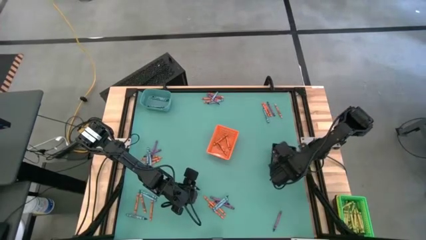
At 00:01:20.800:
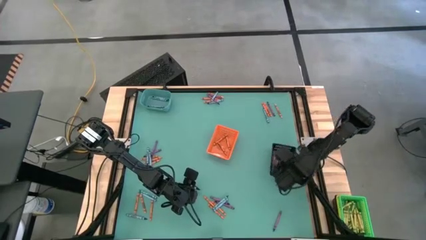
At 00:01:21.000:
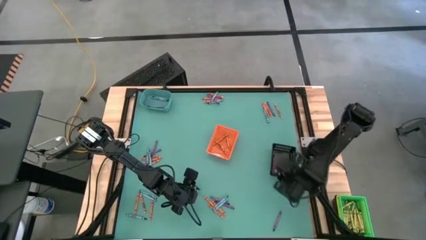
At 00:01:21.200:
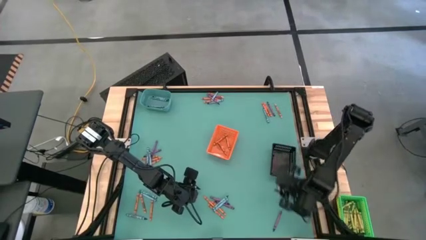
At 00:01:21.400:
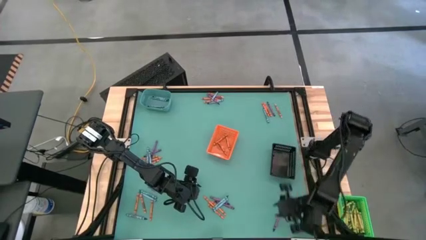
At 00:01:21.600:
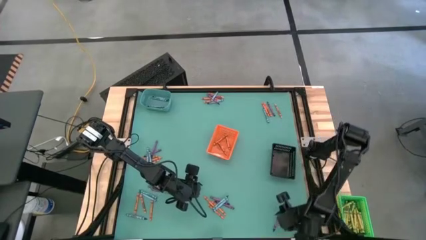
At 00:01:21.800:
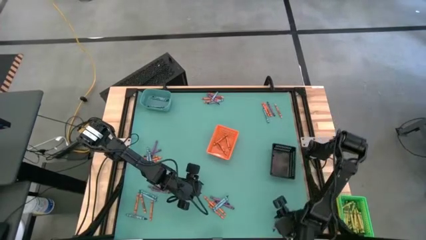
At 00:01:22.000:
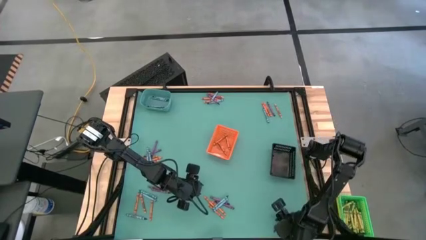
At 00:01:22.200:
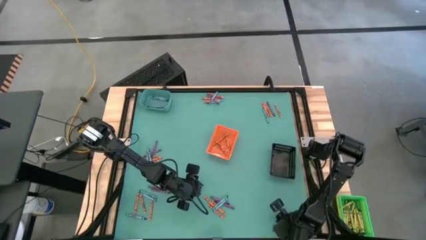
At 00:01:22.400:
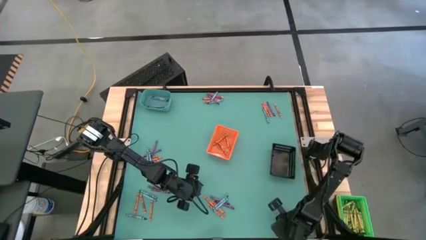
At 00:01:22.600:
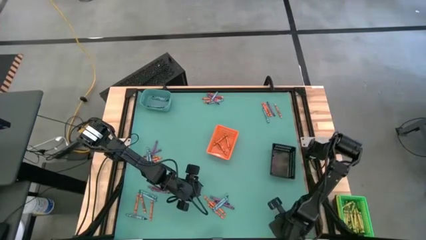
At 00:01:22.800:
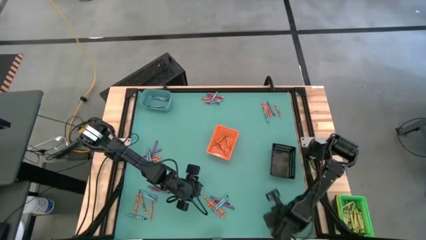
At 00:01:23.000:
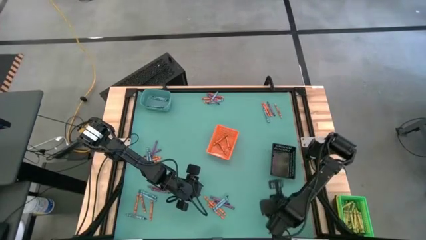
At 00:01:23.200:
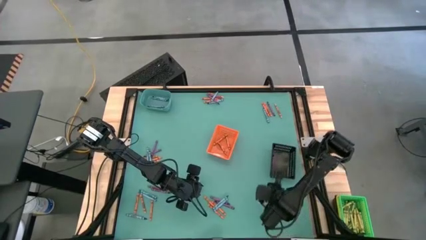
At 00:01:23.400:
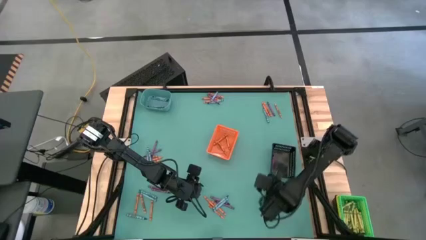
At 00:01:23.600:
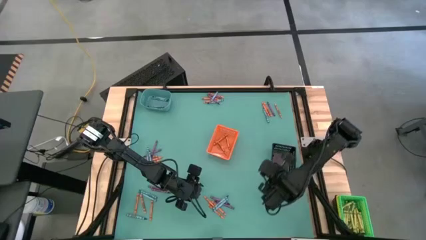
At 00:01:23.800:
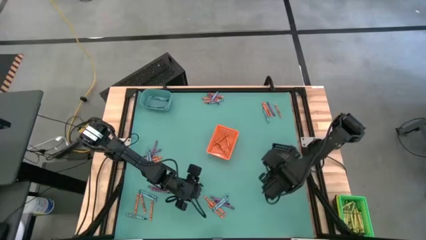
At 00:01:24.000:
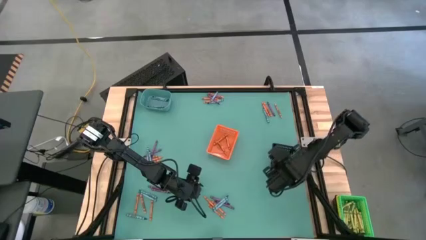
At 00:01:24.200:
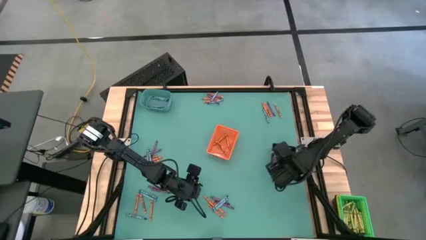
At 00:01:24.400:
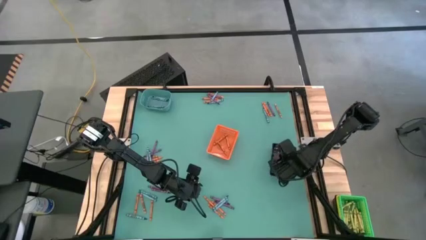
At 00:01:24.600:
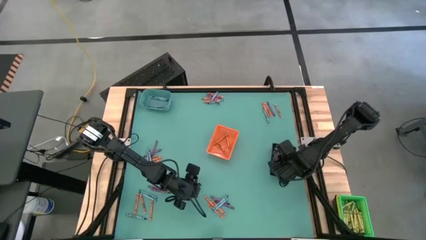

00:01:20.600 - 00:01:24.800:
Task: Sort crayons
Put the violet crayon into black bin

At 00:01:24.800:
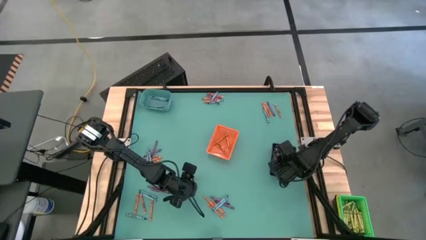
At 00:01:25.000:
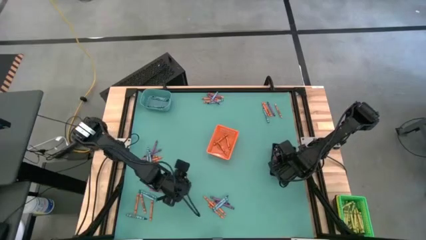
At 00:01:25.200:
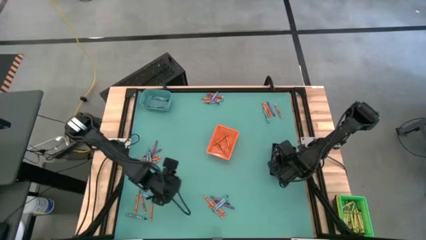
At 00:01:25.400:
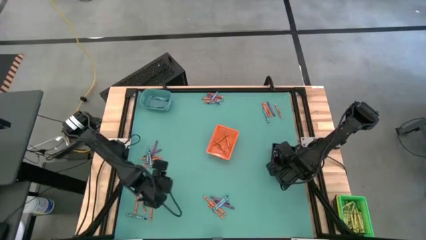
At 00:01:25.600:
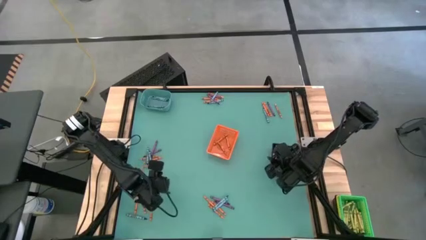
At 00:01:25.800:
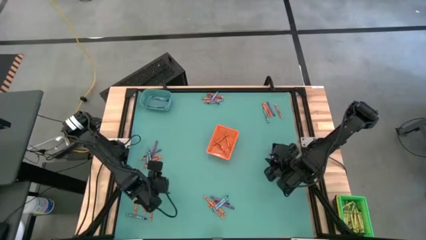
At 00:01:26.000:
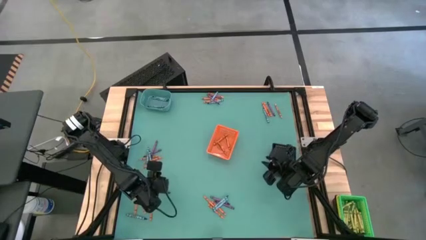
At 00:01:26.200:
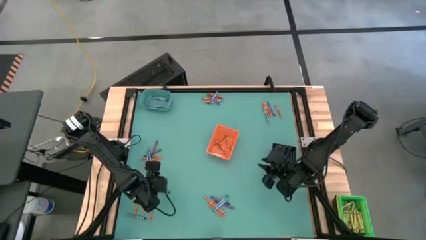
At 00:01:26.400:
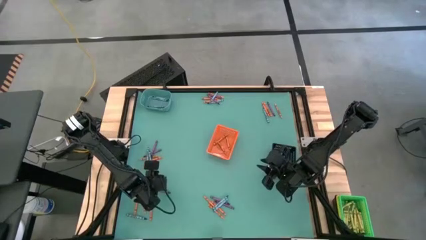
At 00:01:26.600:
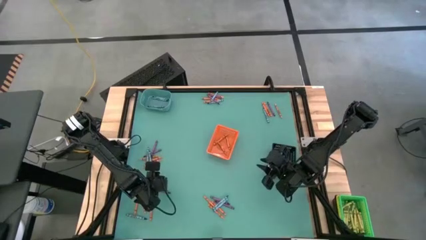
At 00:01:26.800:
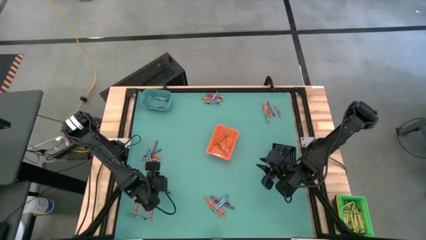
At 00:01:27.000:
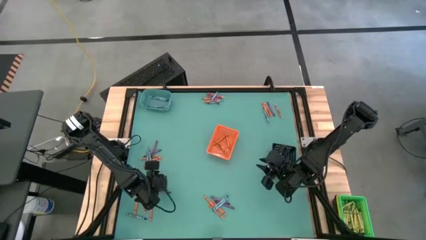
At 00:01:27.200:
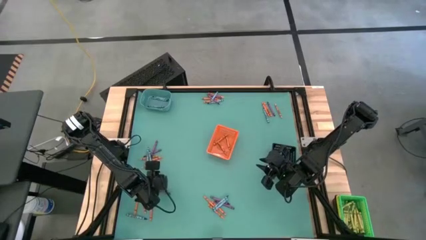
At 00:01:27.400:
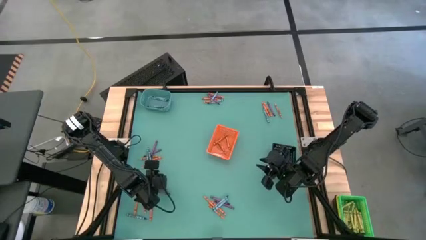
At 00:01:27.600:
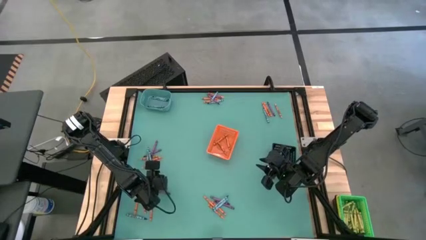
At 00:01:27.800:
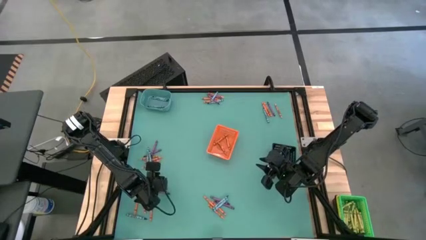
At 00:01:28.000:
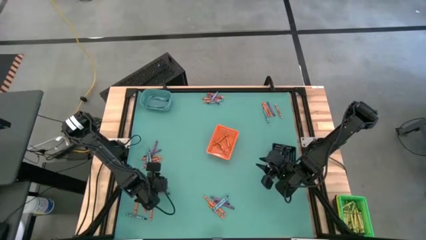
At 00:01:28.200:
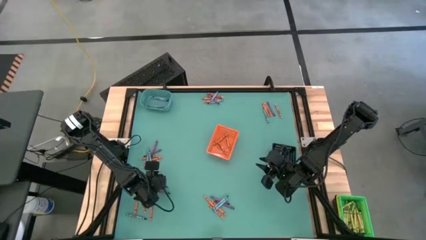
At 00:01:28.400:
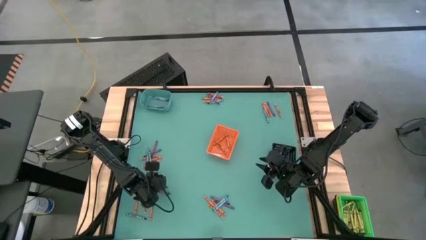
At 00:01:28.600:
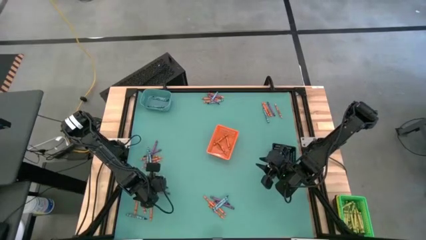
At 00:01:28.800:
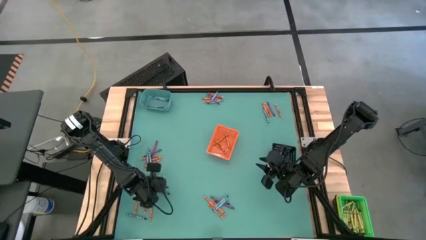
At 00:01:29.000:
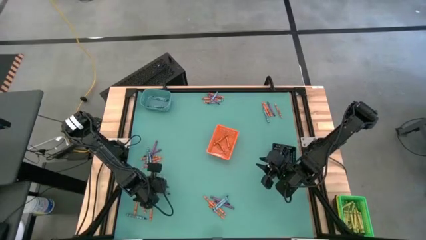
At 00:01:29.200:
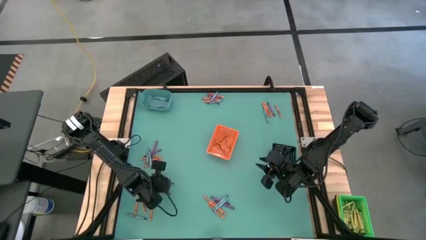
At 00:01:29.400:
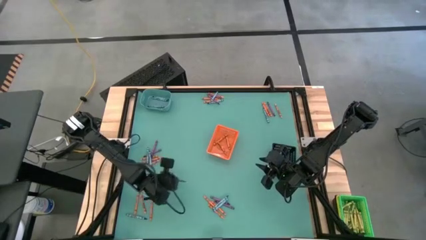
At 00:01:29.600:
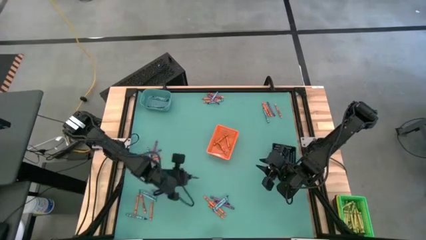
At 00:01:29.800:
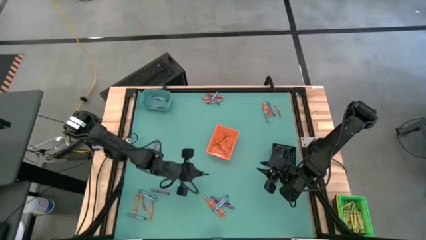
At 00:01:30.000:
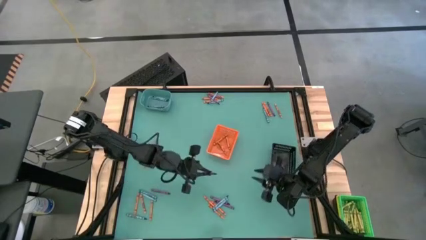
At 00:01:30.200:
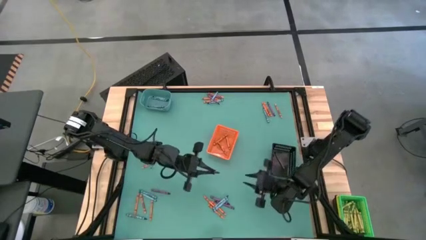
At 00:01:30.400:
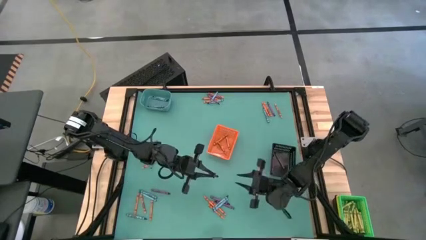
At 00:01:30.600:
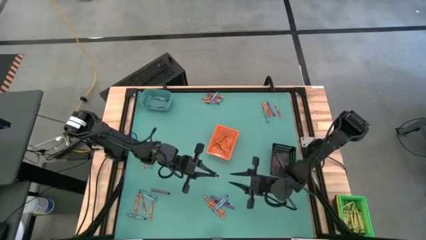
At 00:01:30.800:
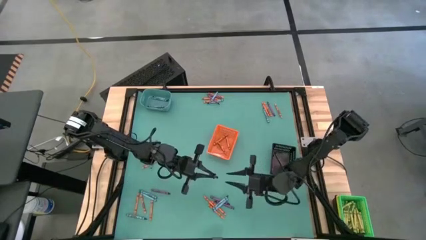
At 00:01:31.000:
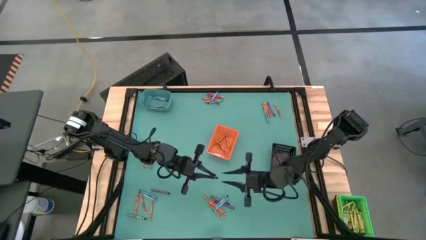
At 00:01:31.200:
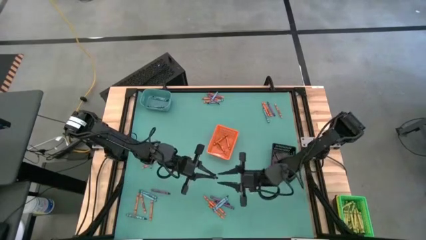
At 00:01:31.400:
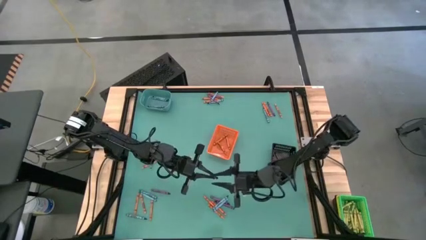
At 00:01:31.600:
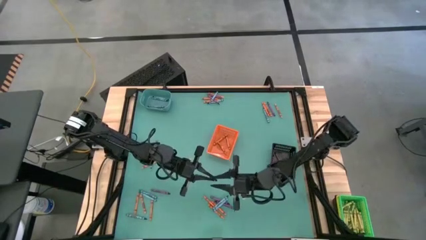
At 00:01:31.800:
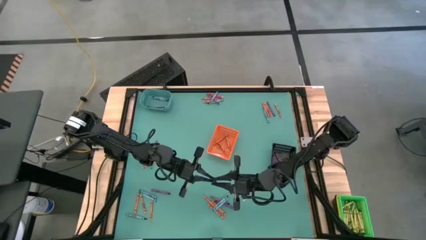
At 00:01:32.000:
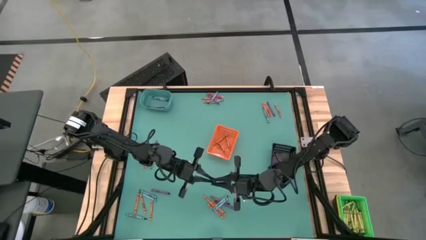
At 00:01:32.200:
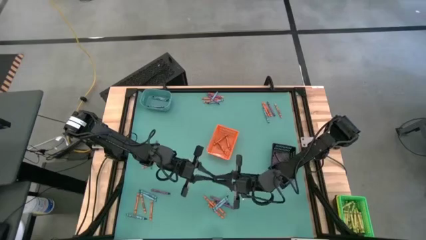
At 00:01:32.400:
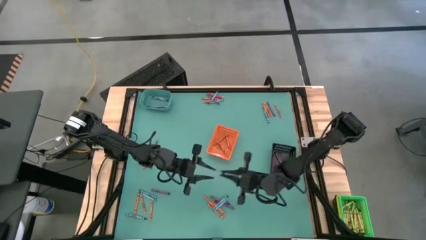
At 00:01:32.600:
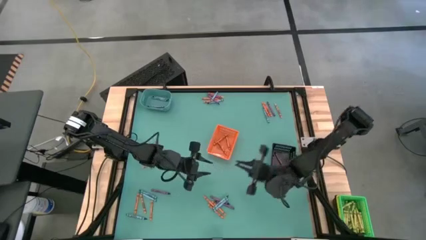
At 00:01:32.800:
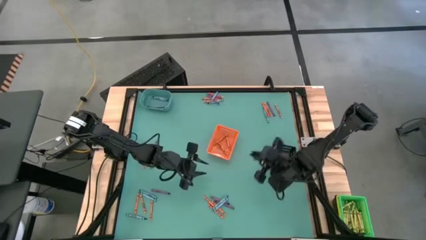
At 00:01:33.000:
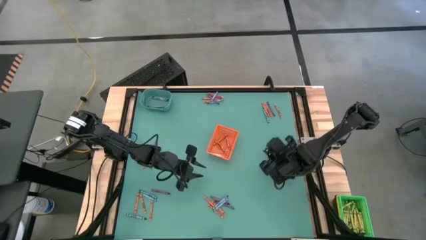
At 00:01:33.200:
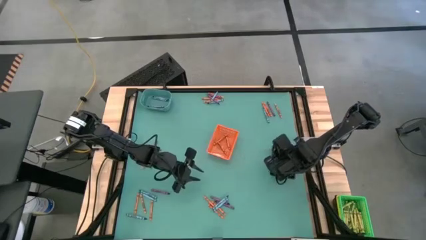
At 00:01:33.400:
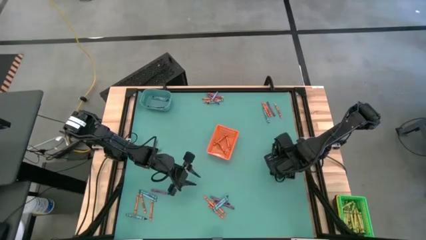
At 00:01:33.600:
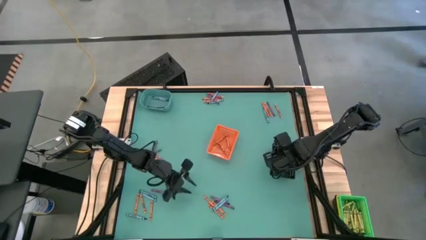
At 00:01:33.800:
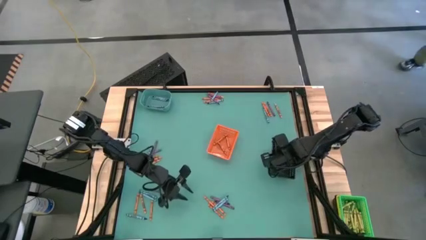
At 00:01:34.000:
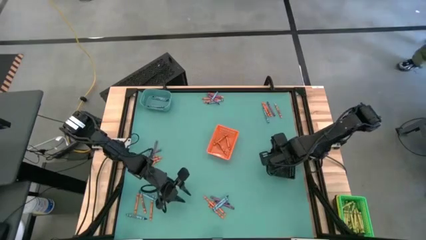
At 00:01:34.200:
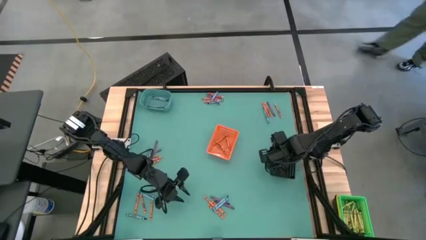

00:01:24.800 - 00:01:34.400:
Put the violet crayon into black bin
